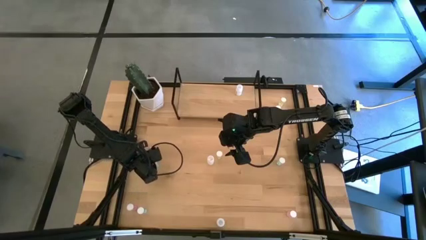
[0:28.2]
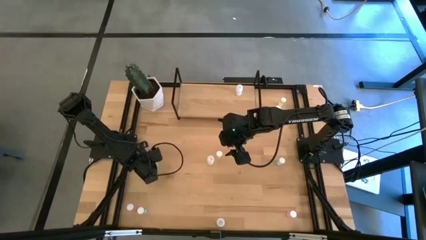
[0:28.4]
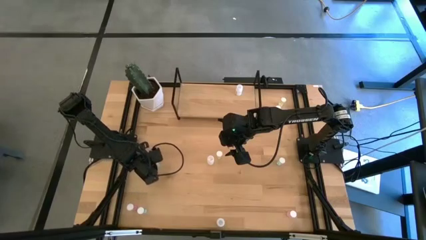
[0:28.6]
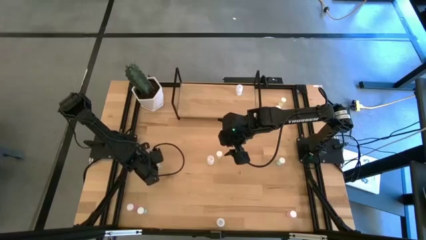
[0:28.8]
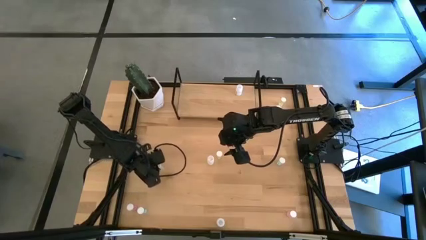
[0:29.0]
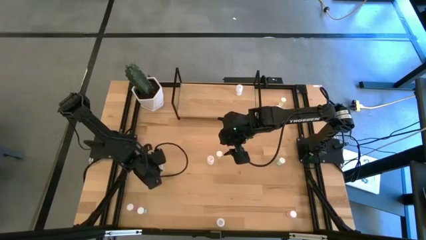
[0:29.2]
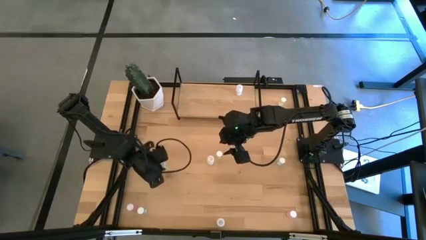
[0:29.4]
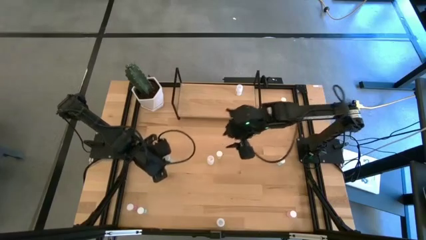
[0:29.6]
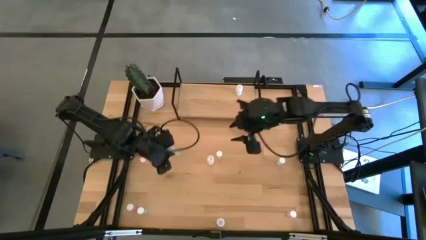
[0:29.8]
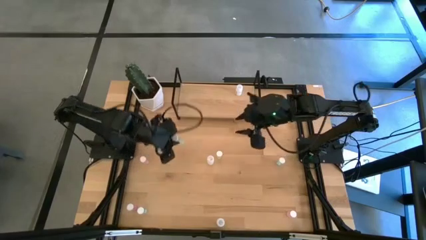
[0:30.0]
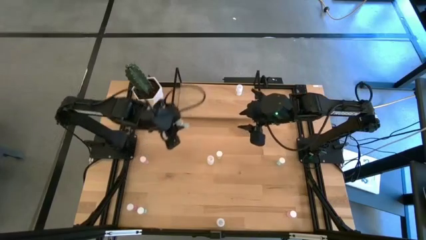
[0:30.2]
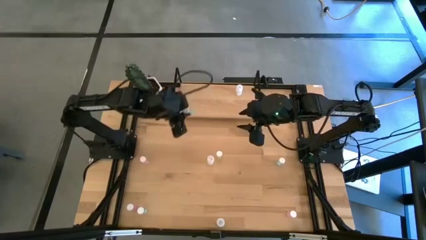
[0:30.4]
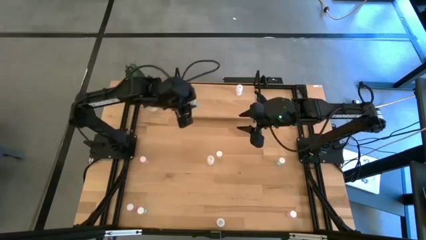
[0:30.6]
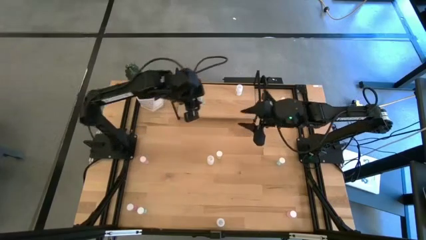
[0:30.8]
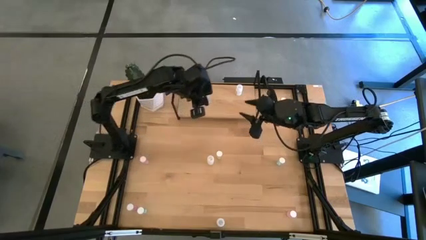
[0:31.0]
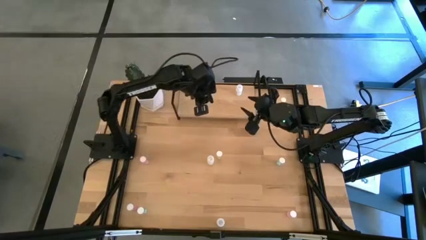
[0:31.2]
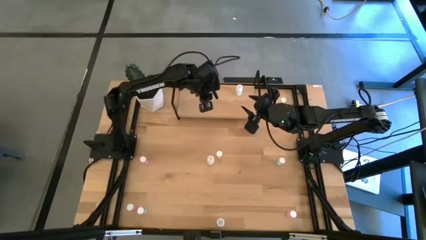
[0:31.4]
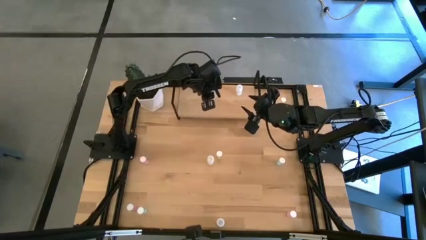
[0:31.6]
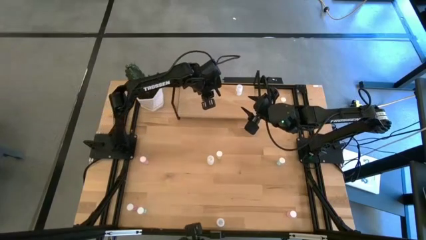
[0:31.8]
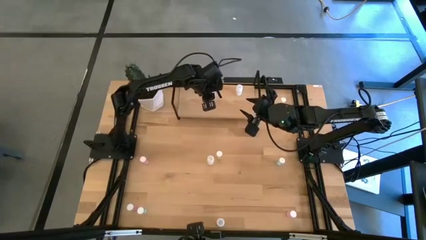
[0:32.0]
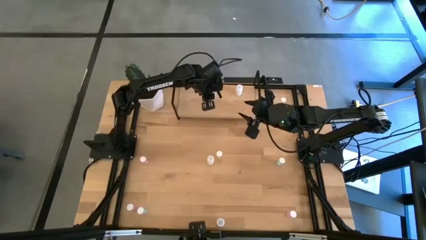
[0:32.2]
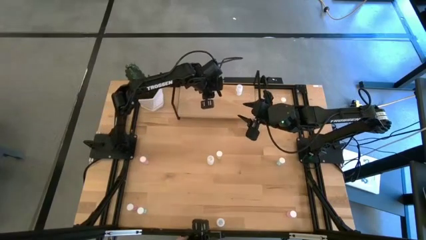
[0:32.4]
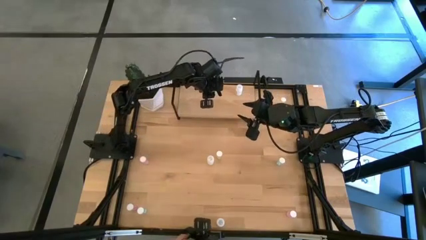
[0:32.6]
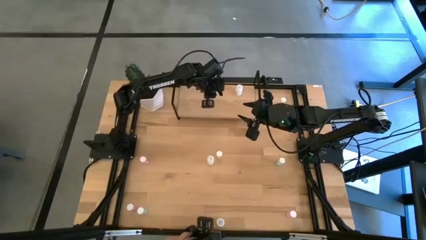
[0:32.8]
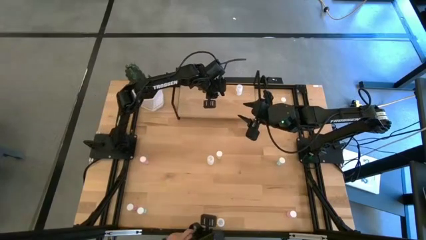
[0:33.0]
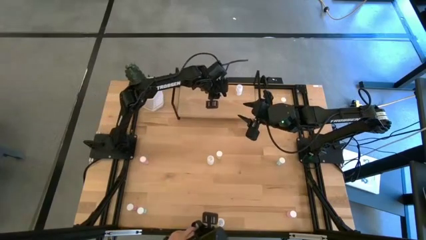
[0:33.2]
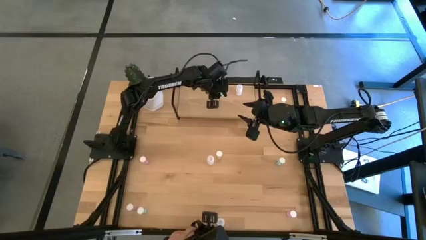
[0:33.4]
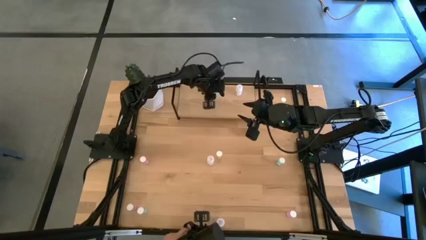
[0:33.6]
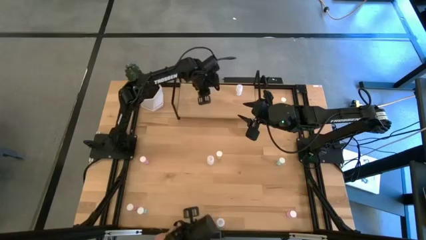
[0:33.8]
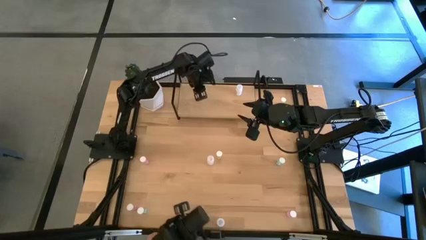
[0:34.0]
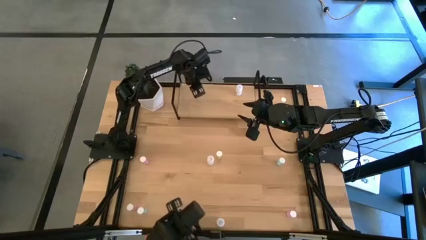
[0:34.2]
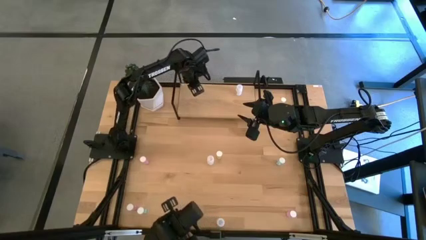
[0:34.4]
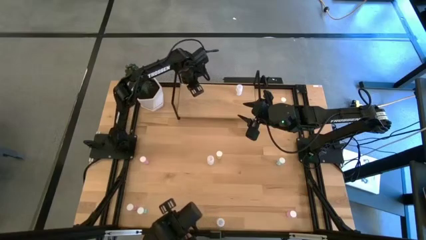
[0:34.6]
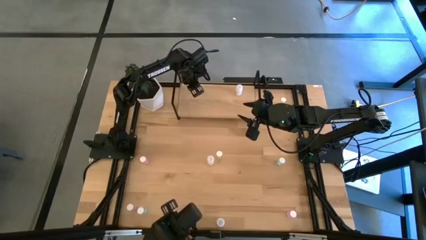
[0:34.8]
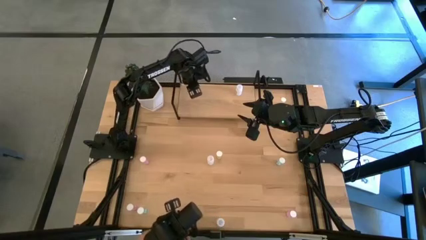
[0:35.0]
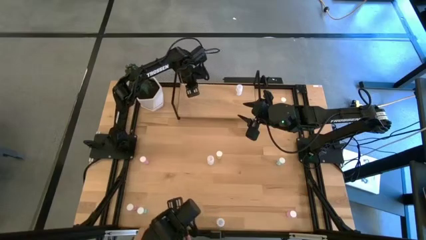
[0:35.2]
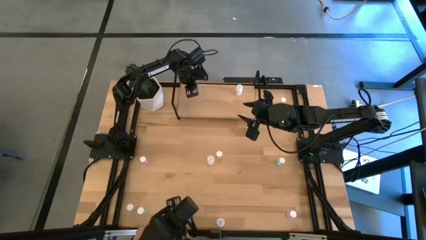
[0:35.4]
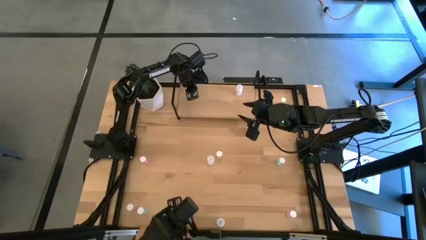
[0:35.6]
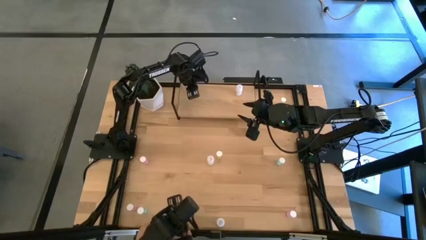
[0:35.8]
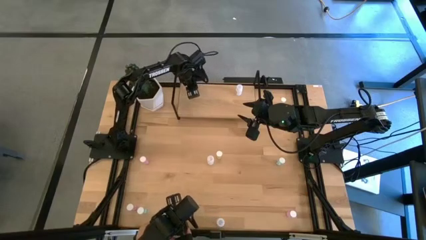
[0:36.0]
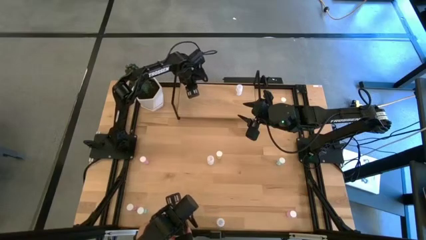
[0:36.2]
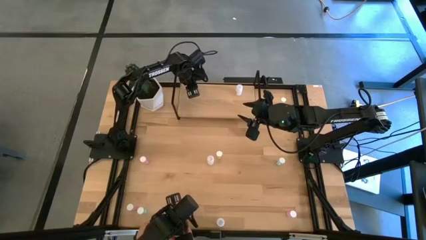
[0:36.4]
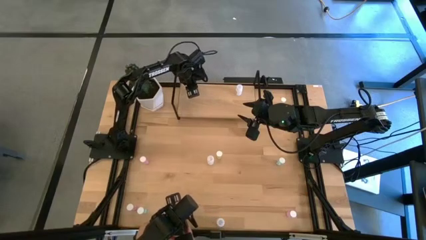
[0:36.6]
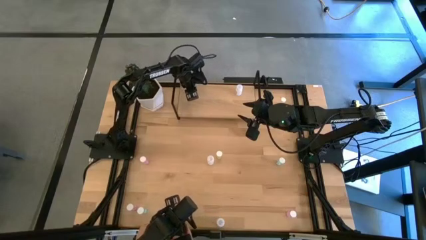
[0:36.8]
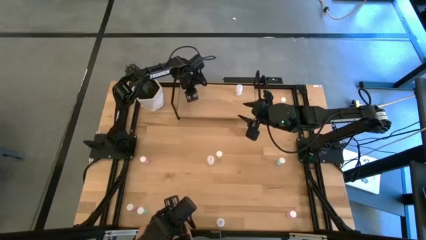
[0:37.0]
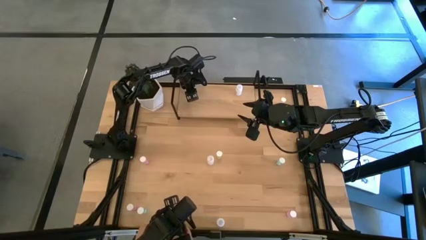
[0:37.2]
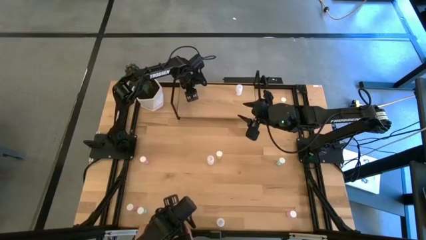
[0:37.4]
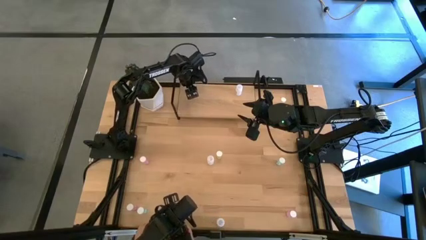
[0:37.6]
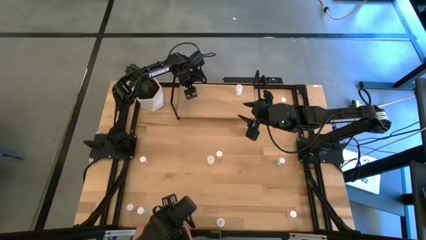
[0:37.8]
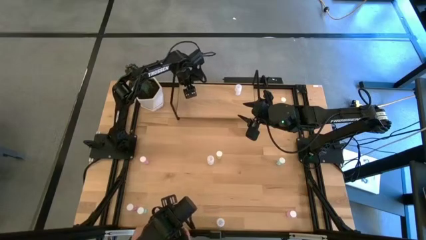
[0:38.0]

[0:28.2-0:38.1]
Task: Pick and place medicine bottles onto shelf by color
Put the top left blue pill bottle on the shelf
